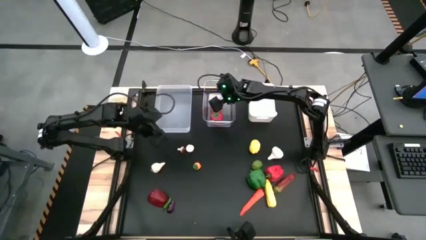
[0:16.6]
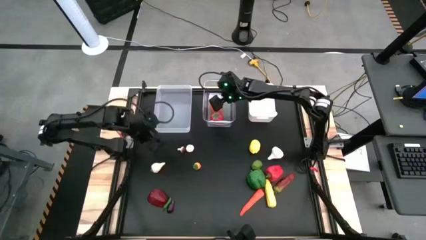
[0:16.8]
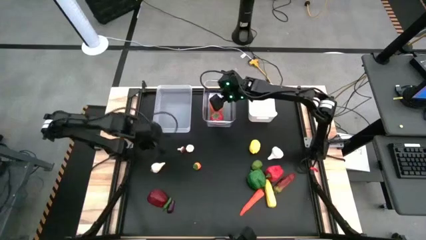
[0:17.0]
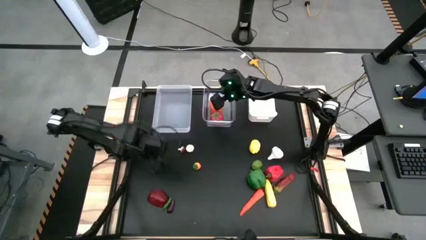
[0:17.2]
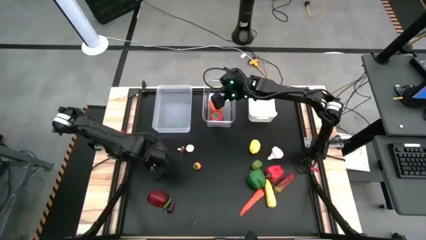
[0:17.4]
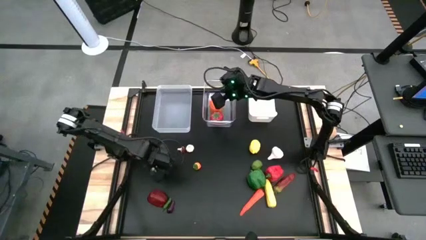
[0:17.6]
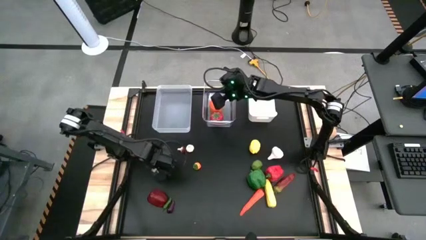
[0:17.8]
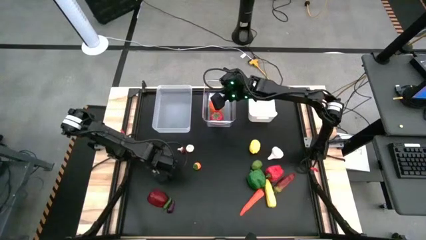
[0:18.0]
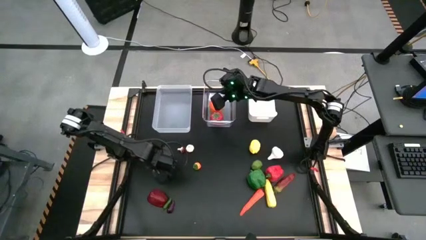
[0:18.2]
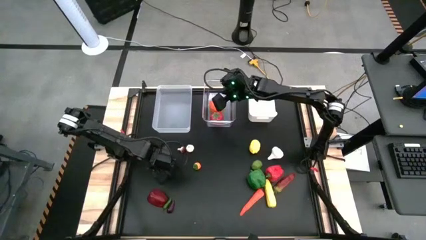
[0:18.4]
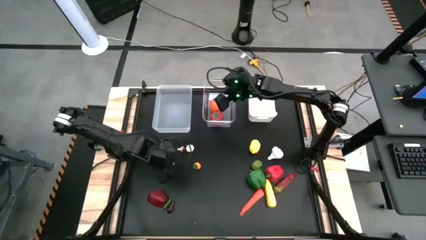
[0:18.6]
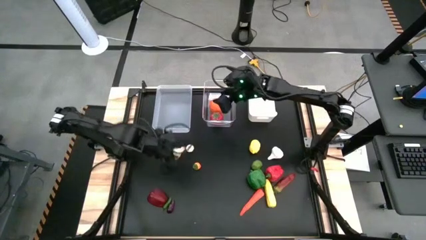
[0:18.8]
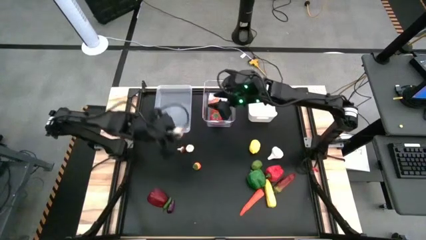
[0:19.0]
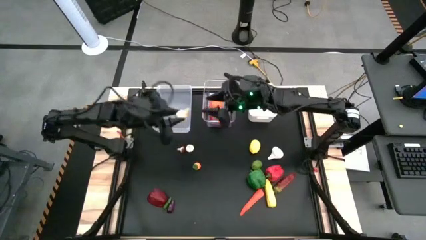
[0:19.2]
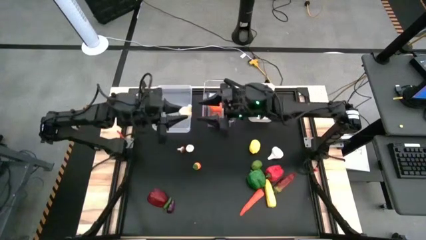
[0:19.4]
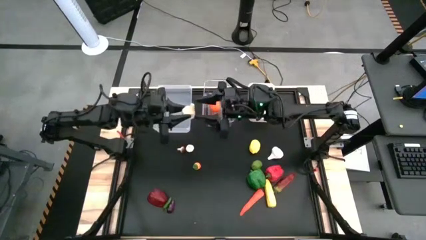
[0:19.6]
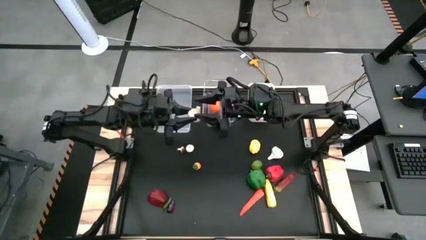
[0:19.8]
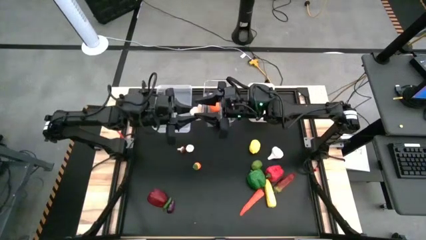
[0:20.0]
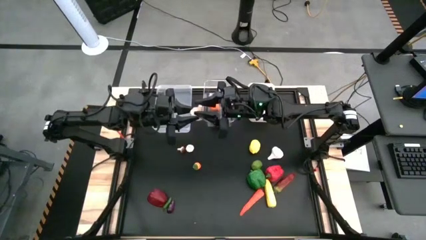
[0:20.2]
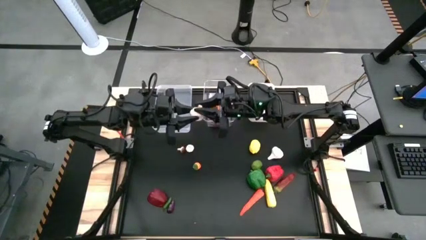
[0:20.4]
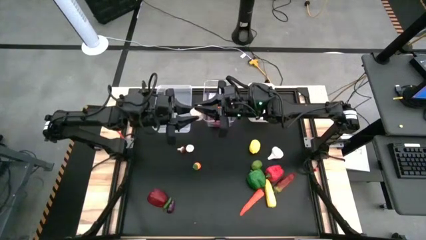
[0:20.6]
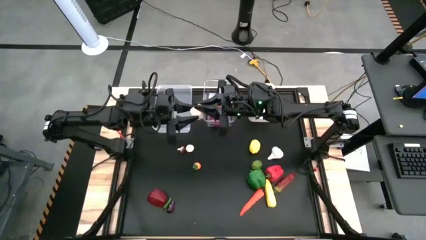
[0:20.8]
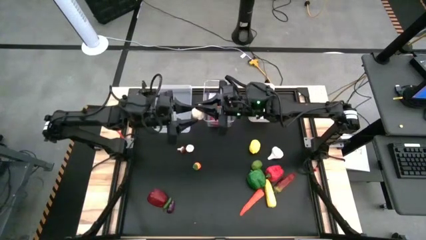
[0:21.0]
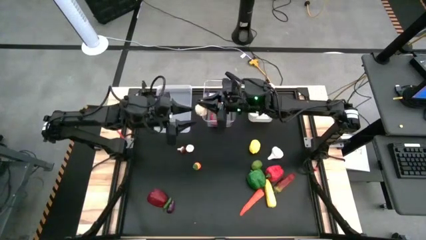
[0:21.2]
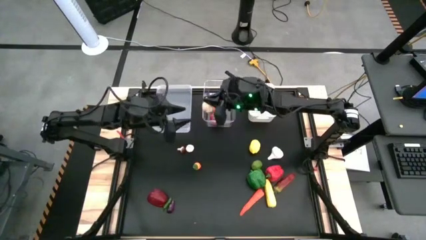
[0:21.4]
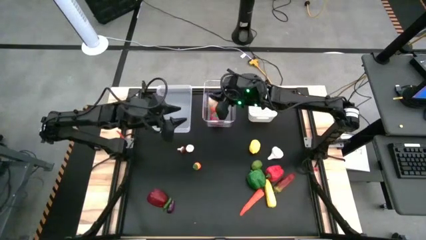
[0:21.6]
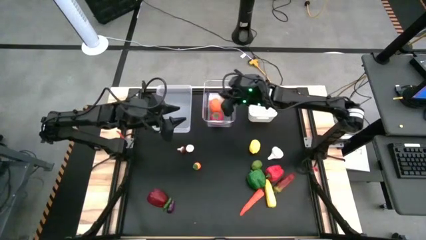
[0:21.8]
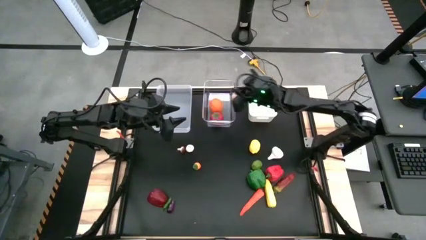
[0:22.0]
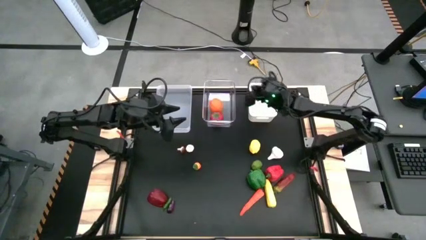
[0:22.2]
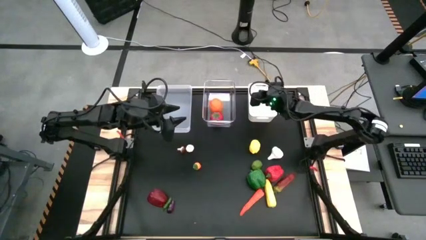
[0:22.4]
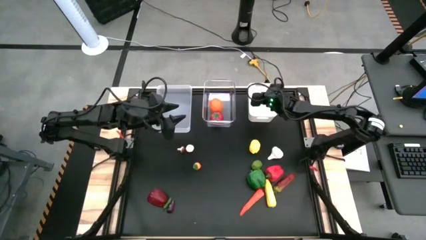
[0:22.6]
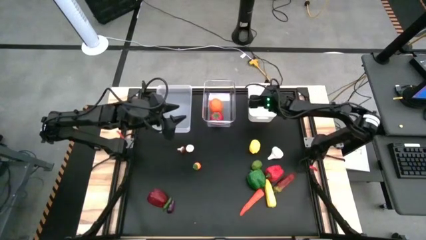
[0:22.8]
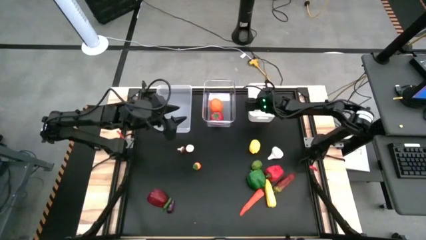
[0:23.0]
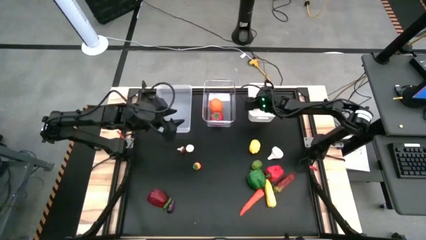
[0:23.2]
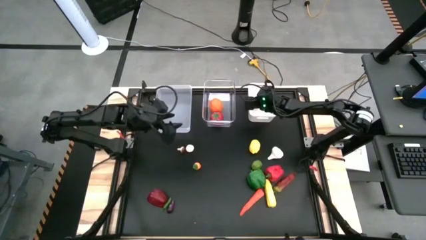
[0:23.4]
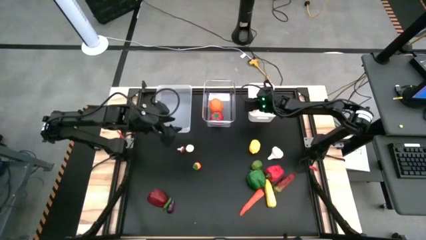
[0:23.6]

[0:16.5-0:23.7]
Task: Sort produce into baskets
Put the big white garlic into the white bin

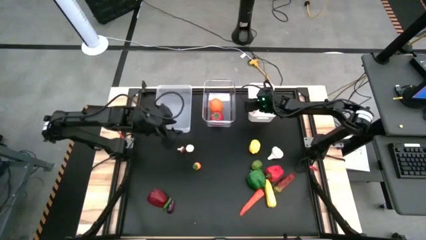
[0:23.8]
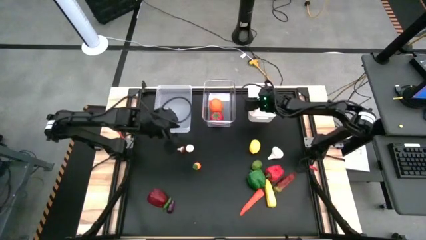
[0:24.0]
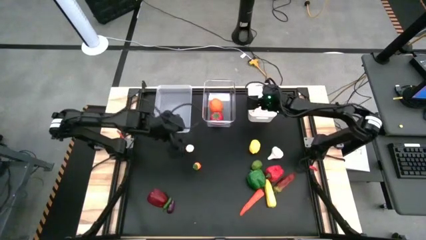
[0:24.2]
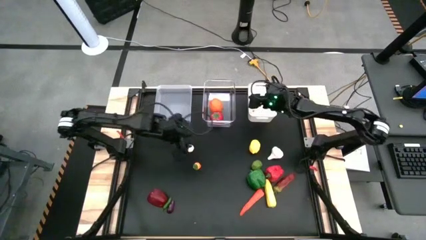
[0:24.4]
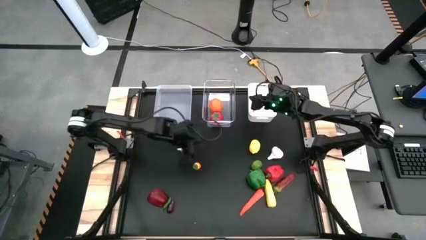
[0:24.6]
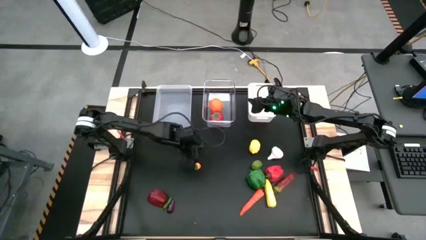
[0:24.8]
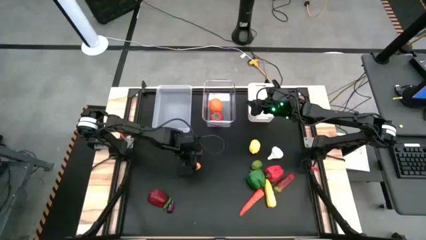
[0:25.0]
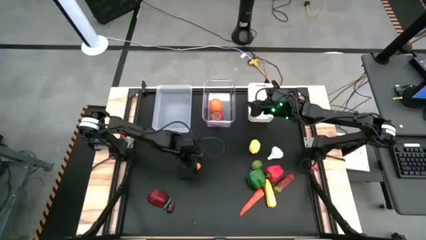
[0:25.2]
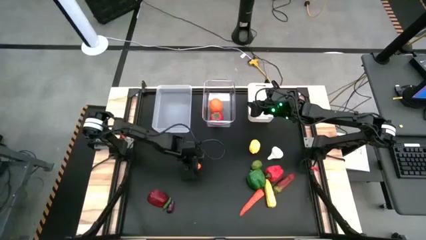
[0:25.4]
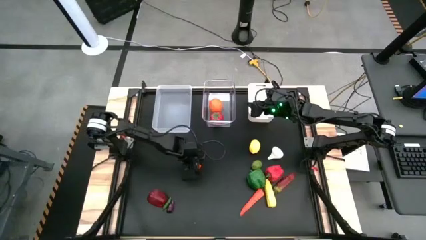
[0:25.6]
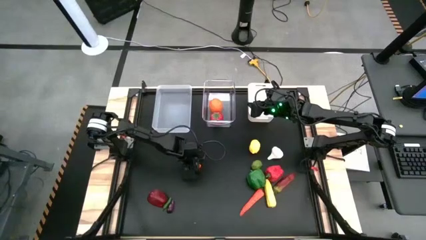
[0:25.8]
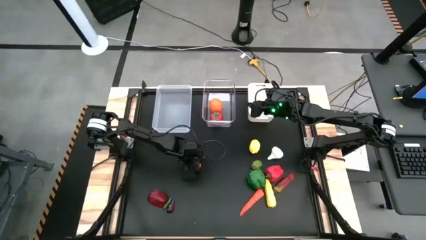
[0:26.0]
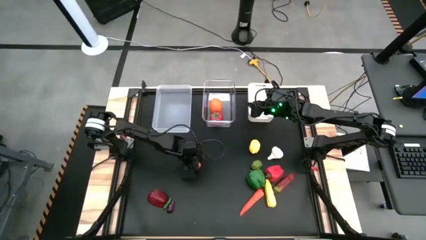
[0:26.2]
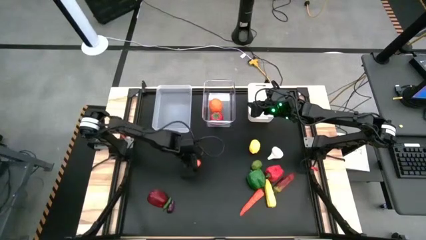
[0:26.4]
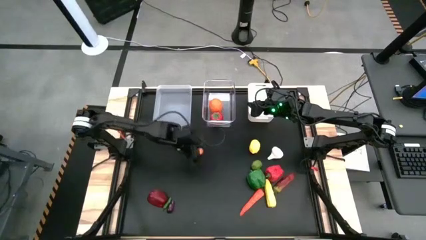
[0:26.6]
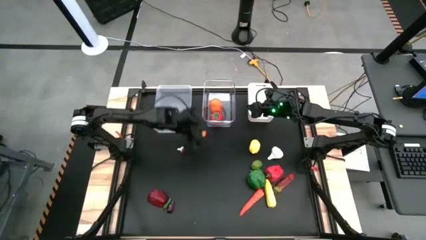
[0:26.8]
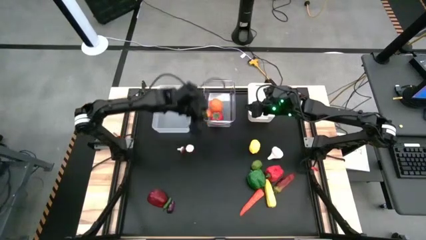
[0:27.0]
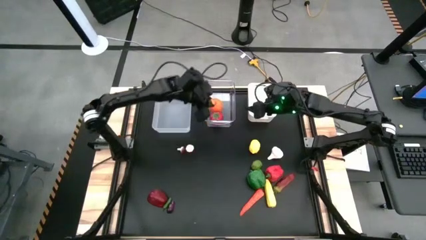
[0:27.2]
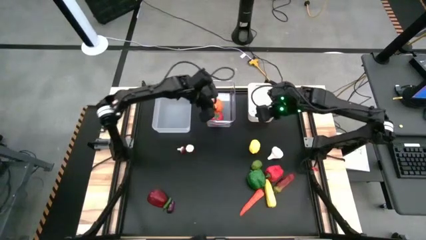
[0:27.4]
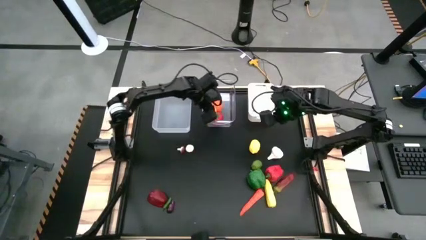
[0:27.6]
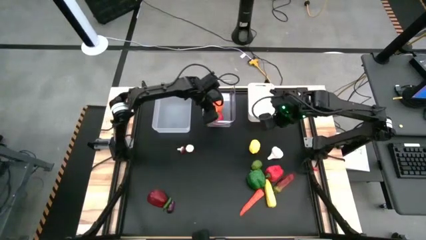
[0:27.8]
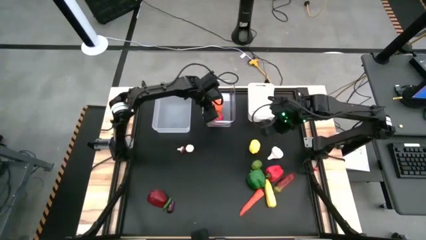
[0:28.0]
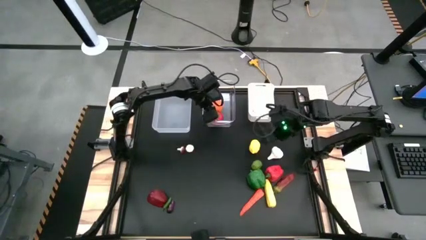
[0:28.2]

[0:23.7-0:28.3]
Put the orange tomato into the right transparent bin

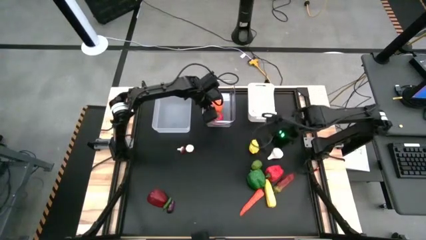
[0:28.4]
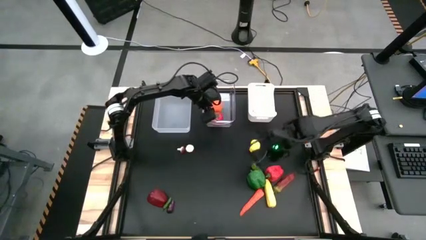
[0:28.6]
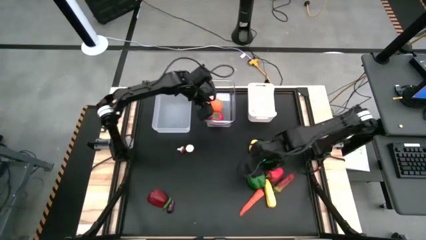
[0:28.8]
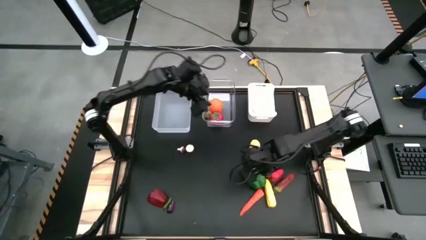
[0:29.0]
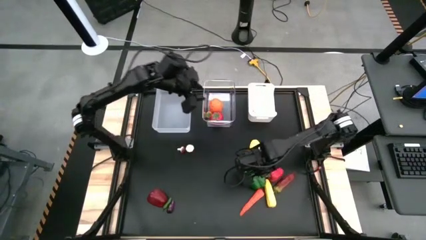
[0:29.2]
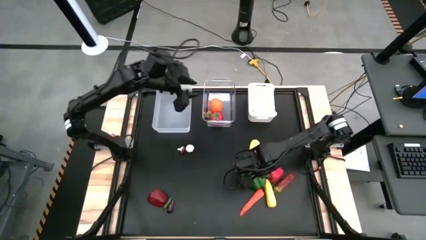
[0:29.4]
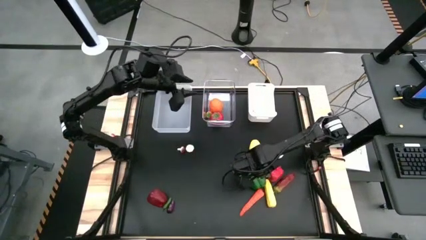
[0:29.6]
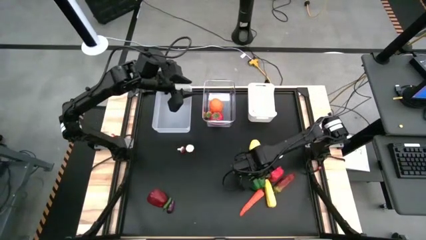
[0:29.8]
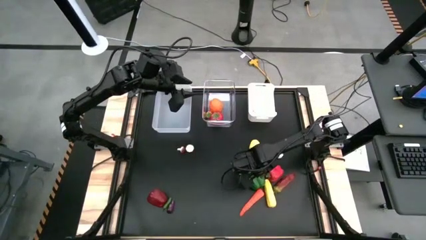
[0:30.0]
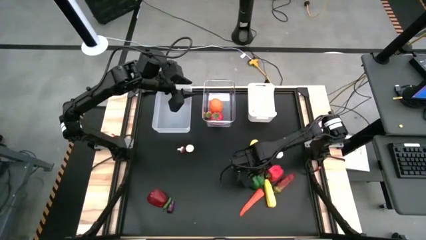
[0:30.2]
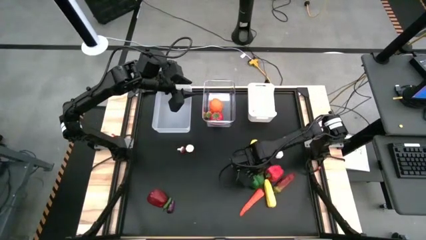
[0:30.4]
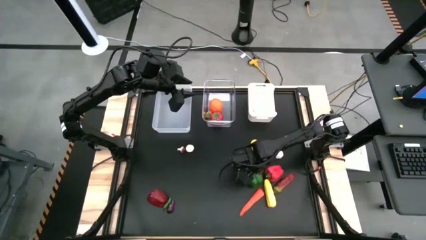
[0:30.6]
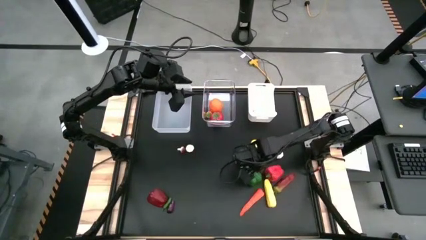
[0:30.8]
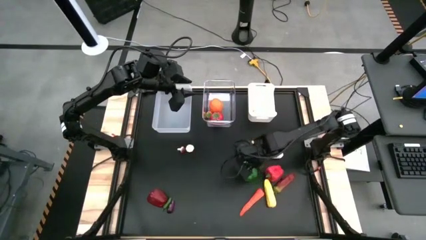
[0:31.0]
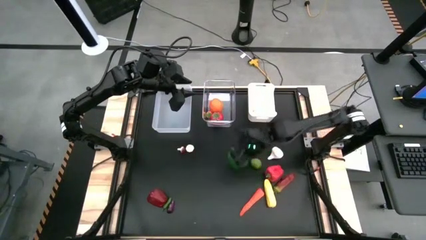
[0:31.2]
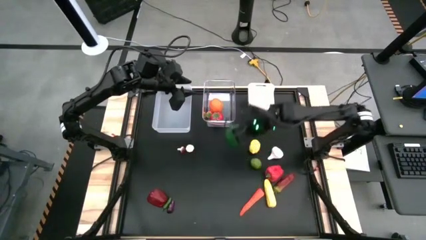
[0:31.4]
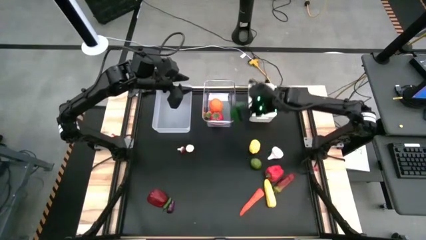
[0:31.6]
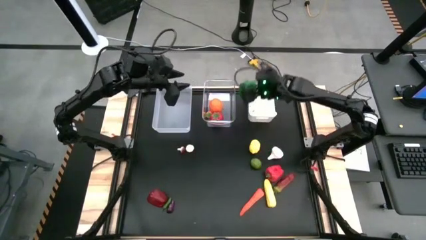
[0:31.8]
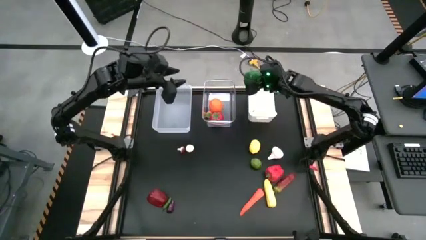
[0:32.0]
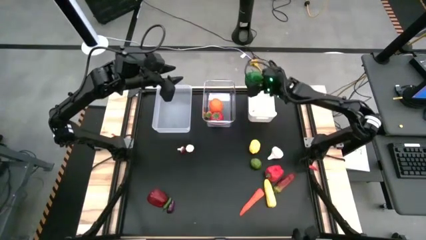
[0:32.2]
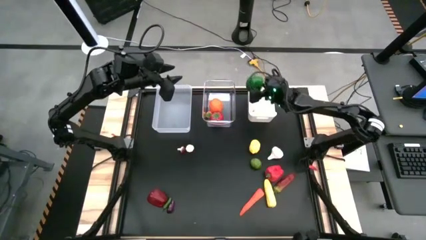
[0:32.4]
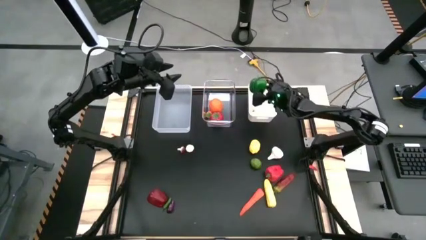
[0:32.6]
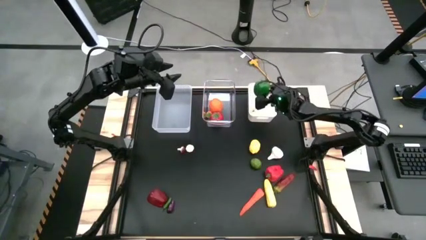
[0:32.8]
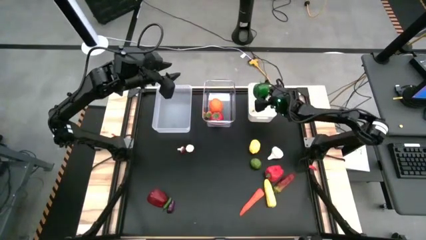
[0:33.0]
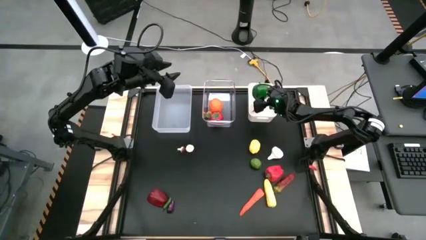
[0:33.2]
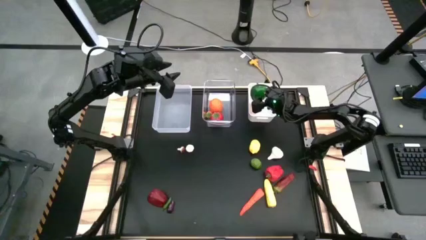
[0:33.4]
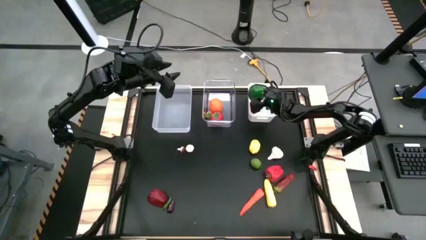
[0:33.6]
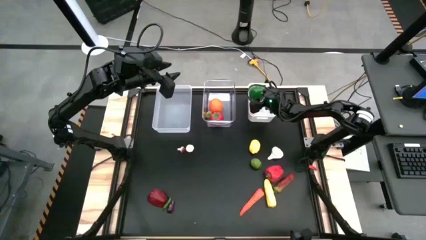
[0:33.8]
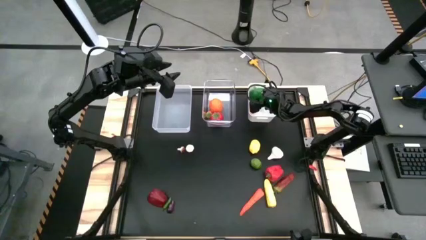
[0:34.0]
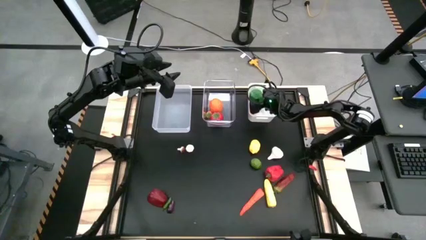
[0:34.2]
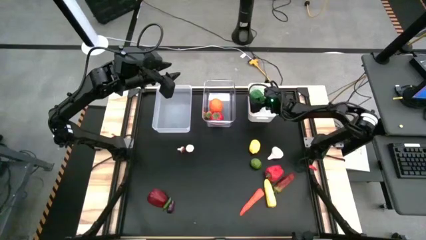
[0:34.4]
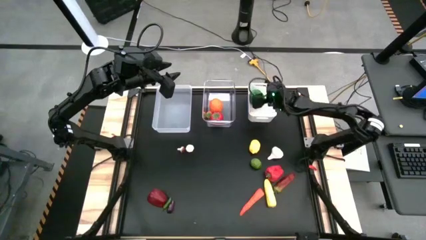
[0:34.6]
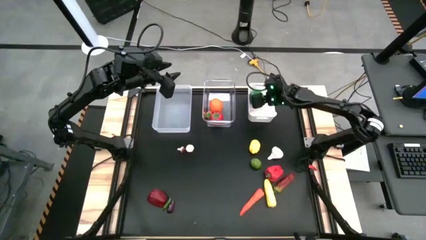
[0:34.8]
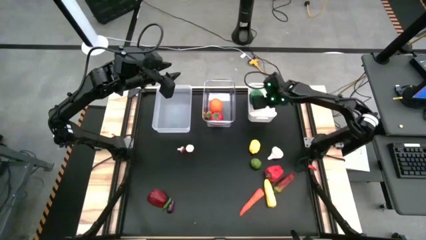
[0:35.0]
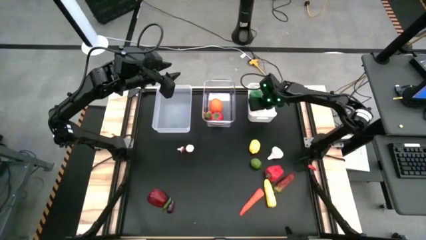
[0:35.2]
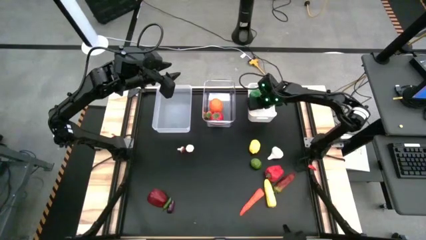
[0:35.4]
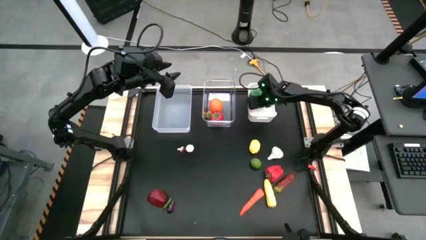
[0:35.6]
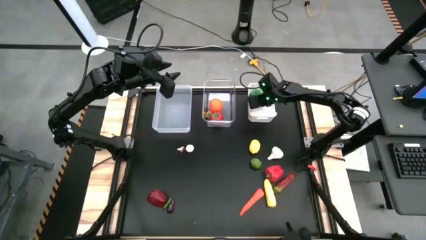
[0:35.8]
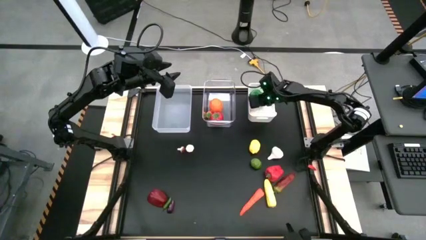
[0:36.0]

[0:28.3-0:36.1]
Put the green bell pepper into the white bin
